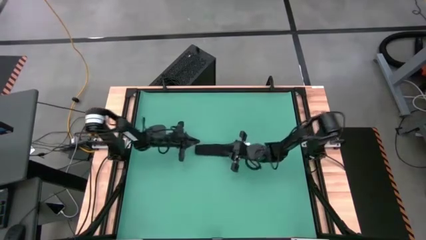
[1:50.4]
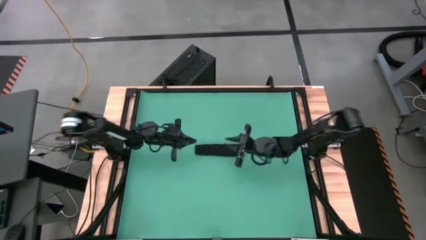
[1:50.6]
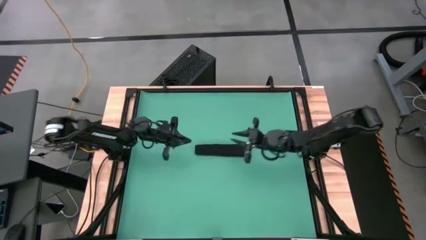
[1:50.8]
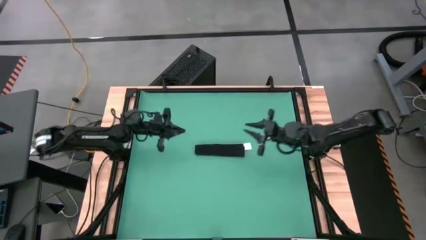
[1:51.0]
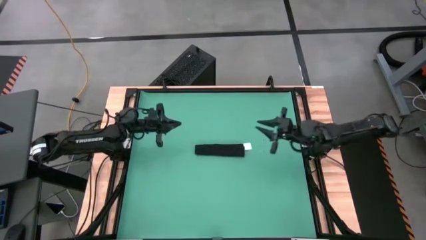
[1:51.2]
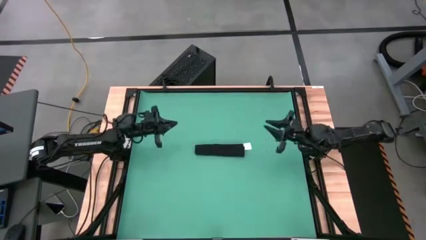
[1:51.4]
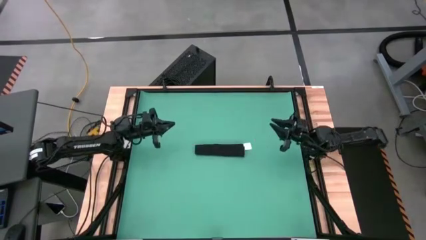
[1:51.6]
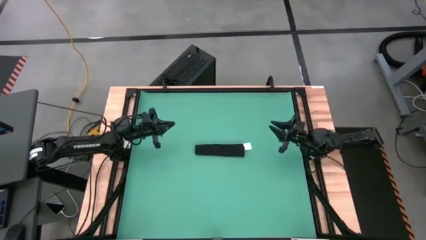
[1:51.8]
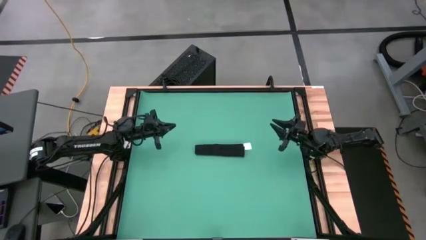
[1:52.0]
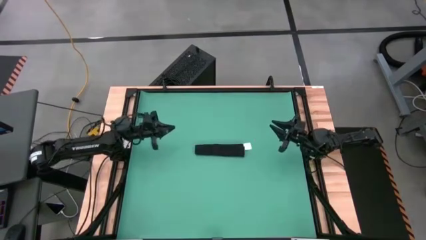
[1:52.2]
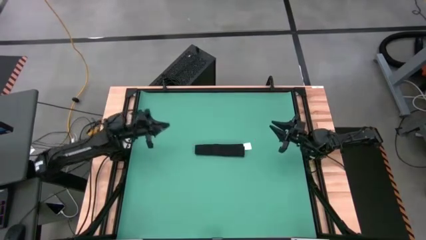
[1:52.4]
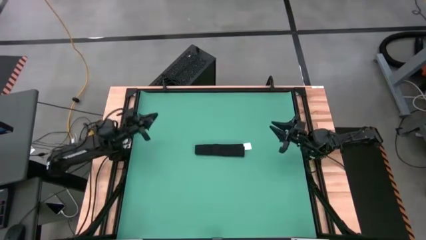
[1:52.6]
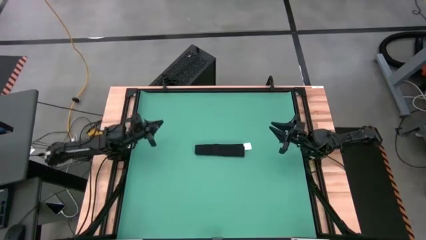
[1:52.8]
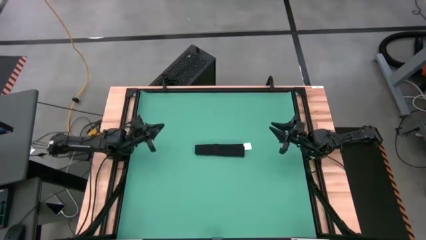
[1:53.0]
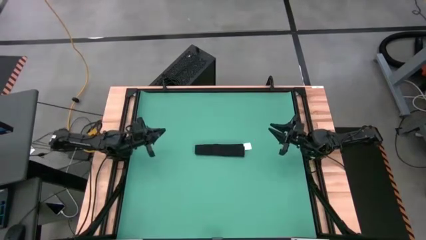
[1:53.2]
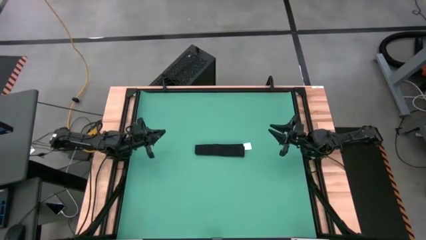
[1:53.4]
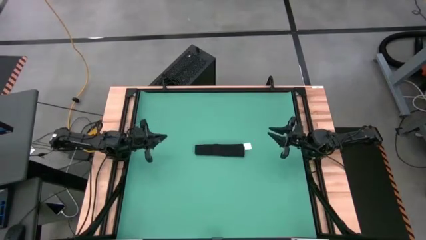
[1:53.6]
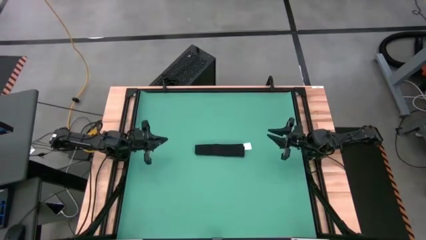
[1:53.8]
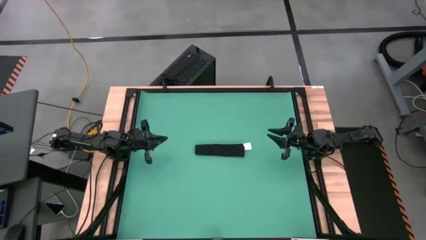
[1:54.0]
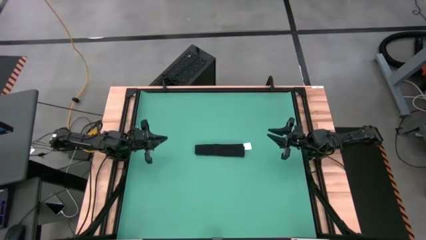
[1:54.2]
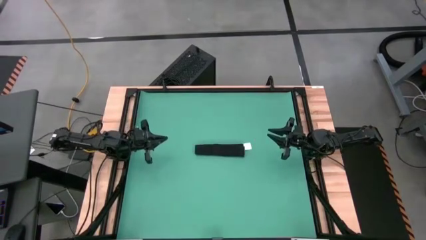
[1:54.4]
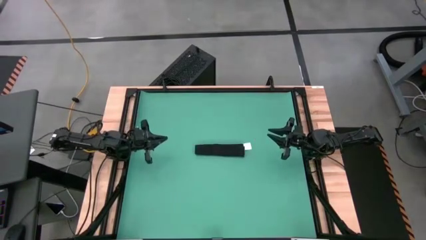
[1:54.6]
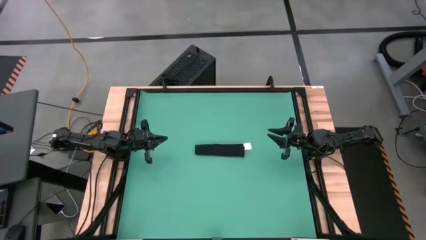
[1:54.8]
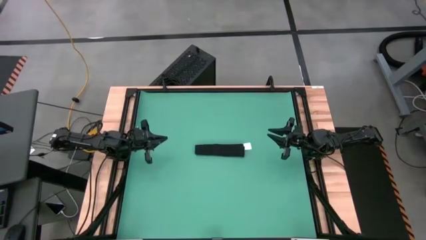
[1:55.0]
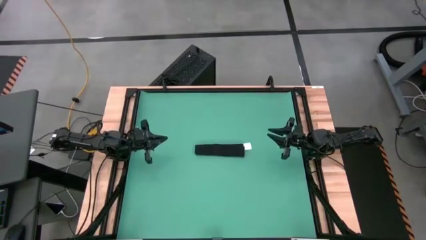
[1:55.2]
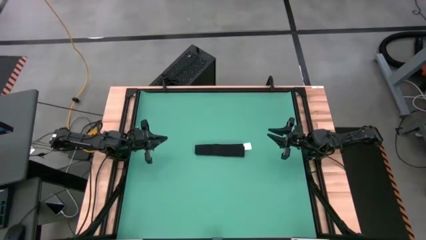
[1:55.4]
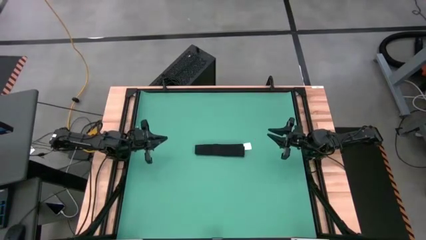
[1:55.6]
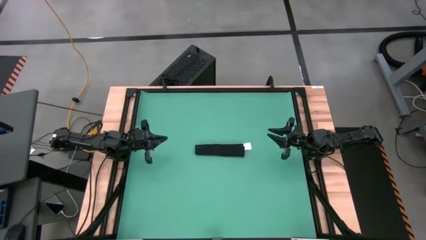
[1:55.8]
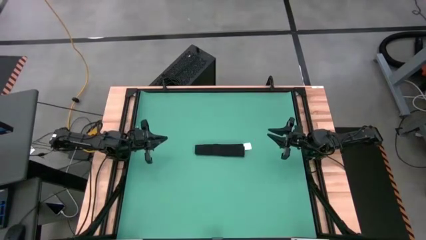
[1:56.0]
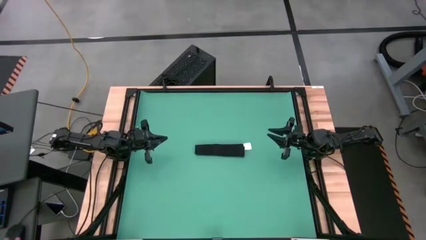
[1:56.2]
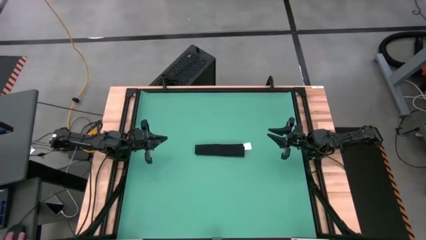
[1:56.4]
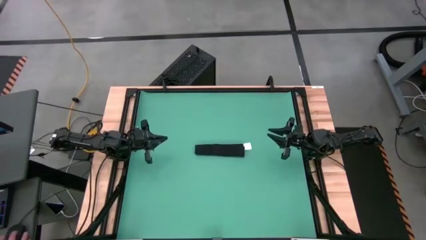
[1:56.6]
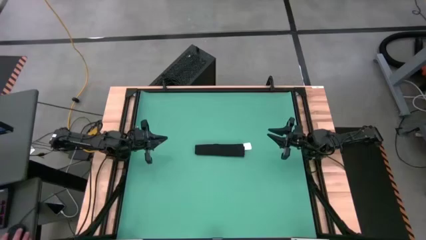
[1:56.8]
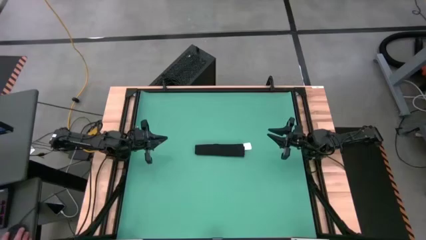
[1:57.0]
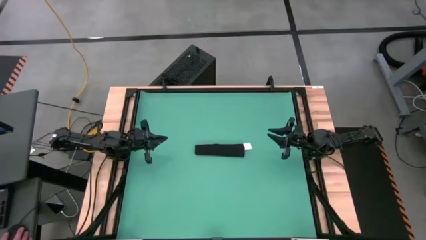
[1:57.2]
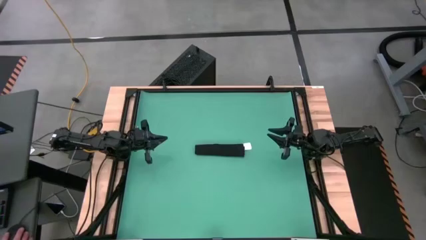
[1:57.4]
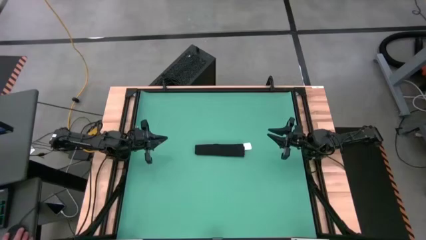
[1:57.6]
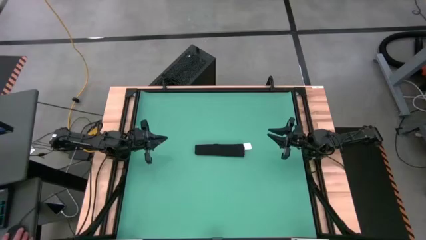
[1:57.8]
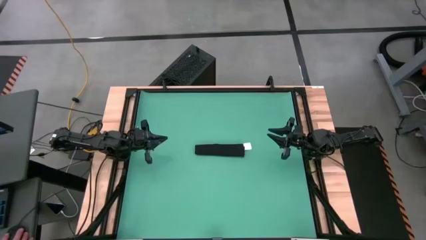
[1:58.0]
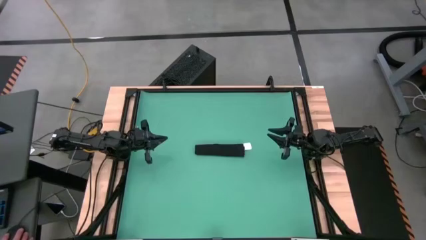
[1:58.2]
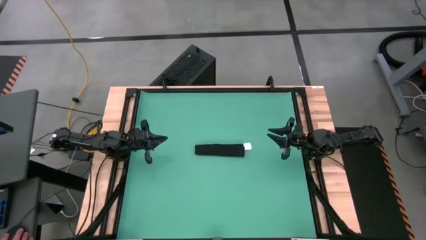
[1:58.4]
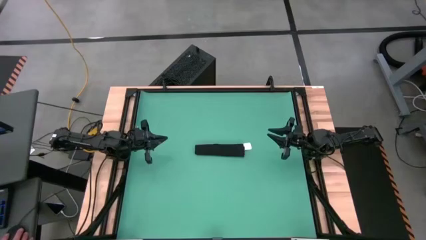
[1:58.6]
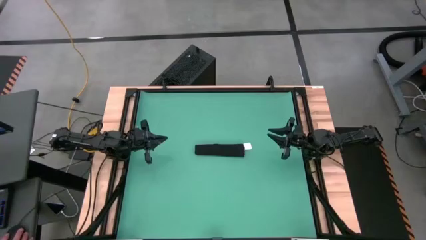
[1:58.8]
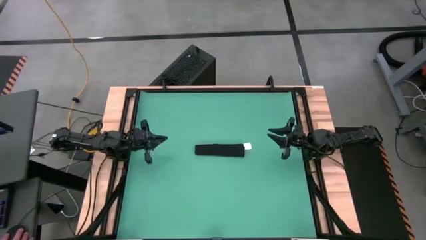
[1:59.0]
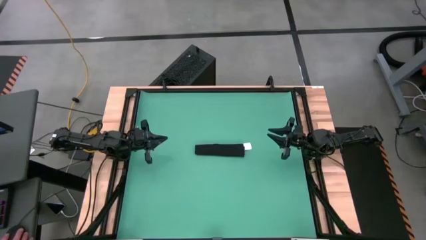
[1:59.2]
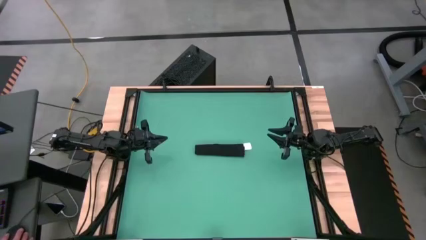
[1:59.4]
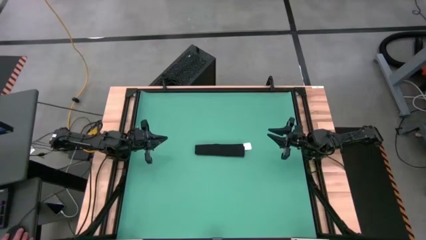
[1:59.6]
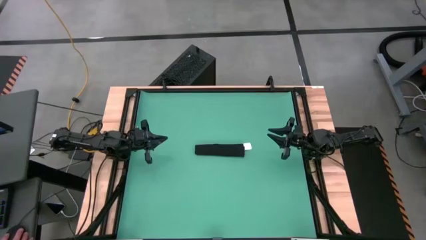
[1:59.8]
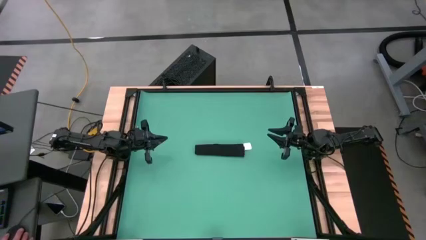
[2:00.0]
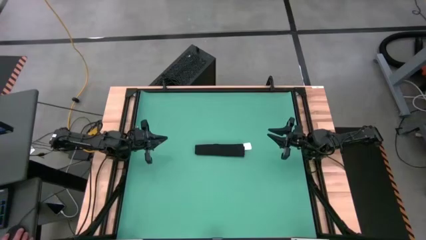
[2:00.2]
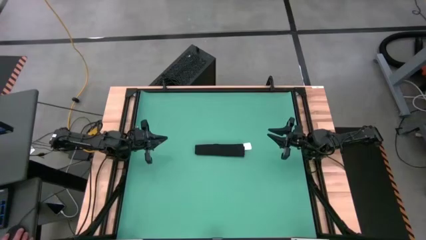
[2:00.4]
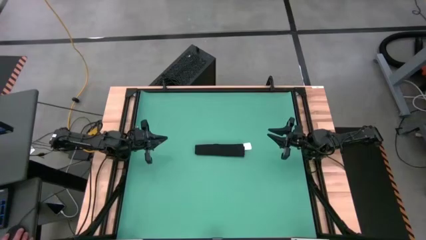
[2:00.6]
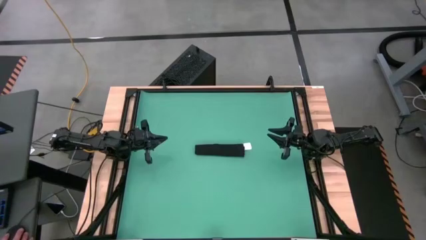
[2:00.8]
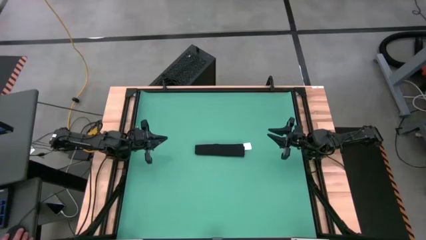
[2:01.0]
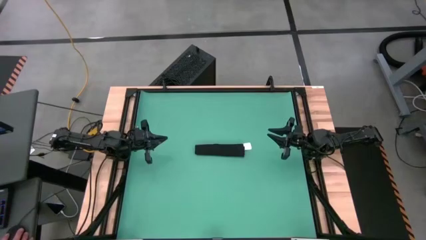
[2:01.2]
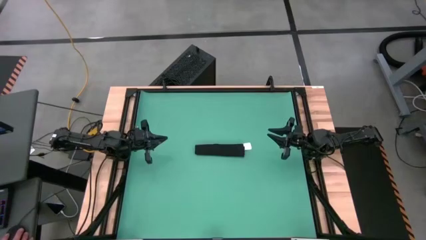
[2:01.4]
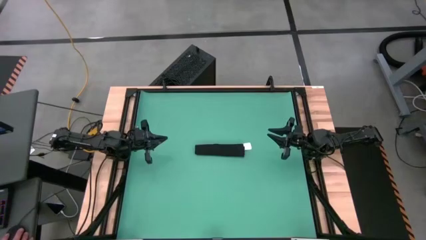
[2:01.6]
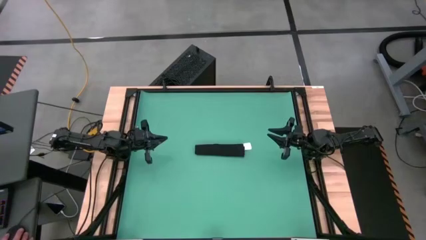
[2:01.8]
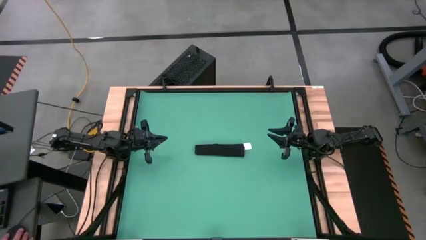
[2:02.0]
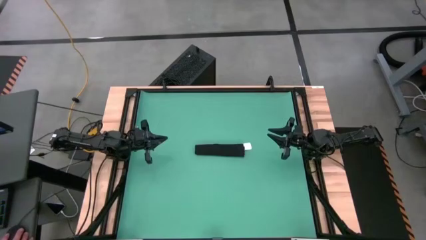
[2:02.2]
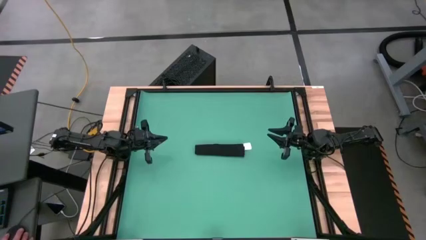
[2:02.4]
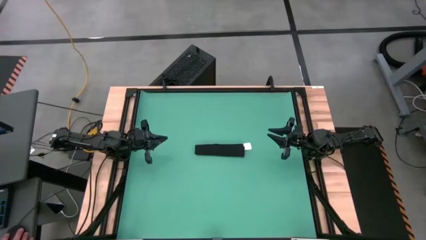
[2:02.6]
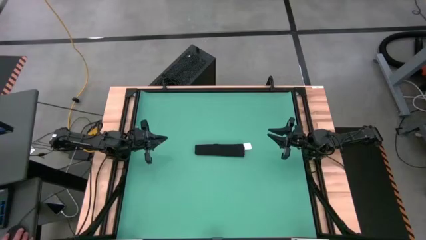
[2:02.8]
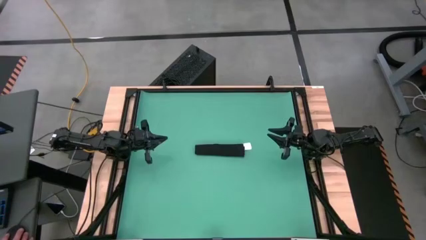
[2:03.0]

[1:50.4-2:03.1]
Task: Roll towel
Return to Home Position
